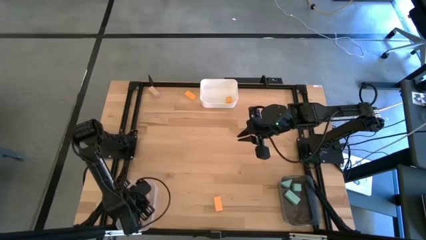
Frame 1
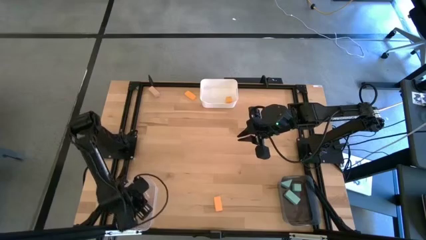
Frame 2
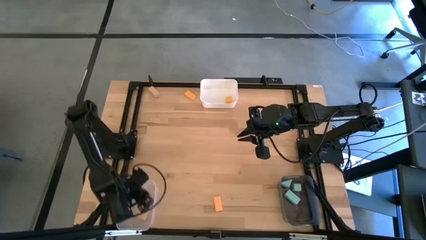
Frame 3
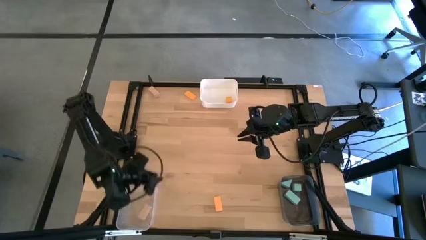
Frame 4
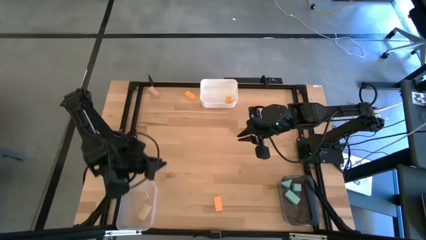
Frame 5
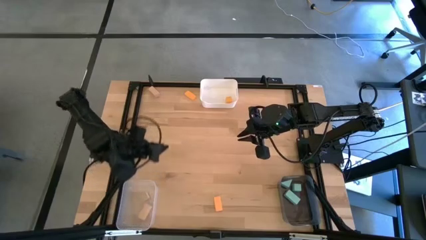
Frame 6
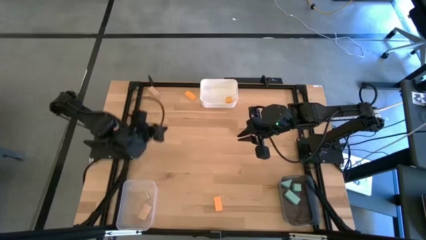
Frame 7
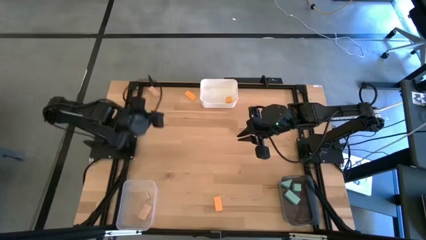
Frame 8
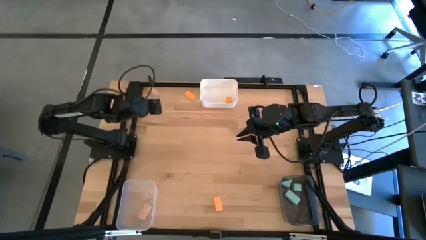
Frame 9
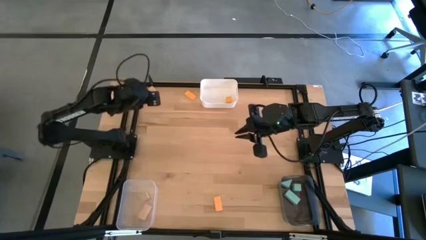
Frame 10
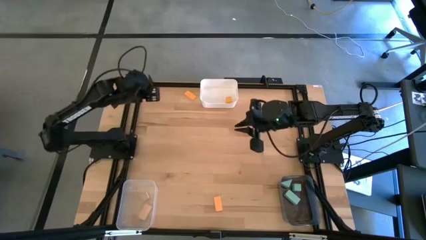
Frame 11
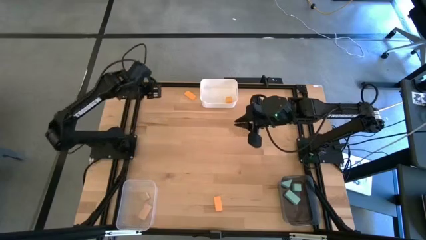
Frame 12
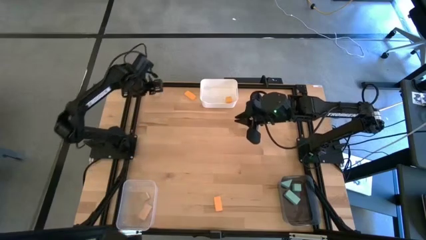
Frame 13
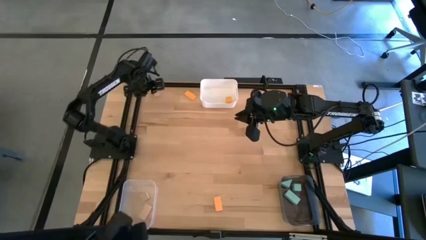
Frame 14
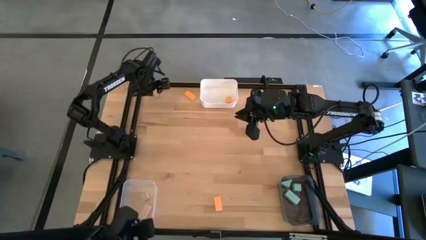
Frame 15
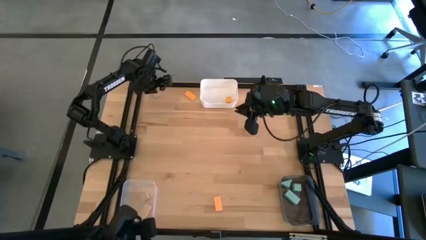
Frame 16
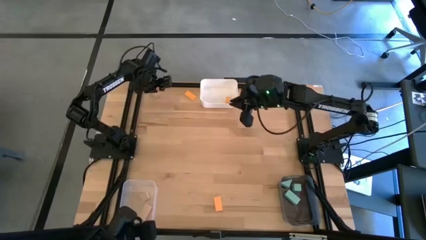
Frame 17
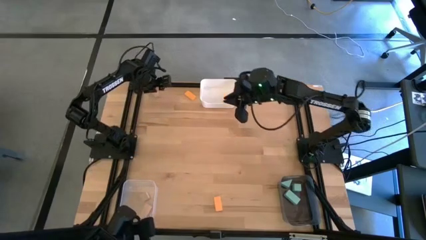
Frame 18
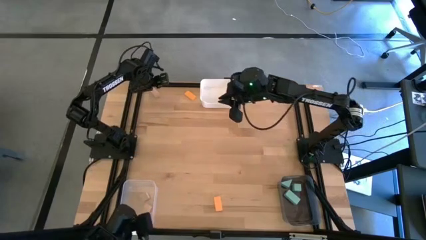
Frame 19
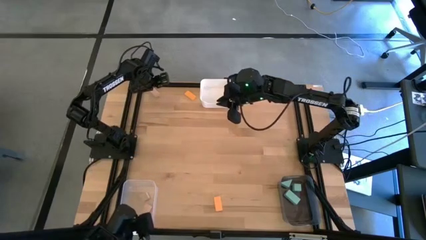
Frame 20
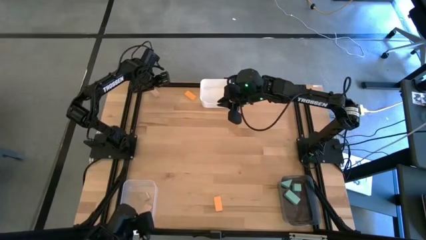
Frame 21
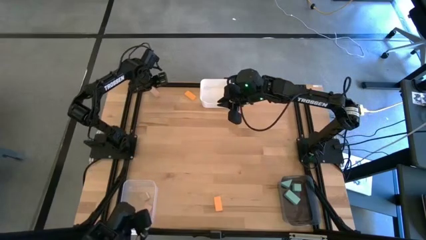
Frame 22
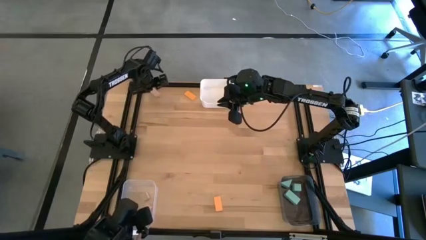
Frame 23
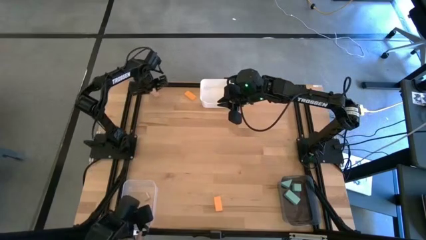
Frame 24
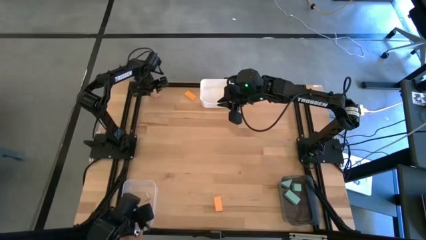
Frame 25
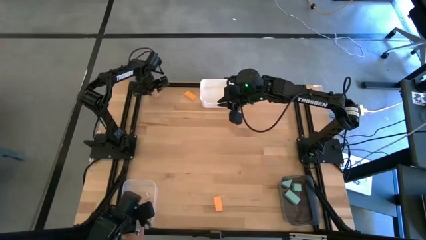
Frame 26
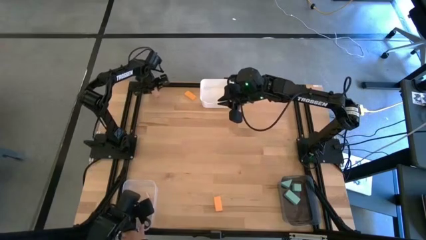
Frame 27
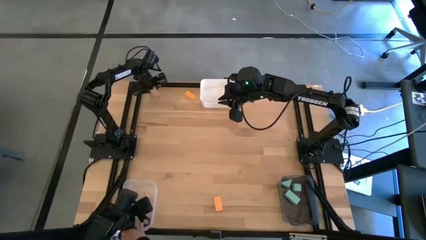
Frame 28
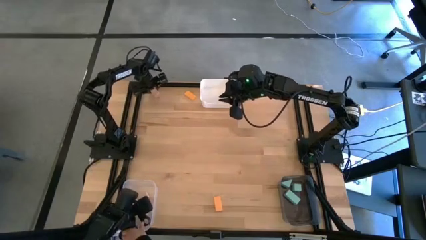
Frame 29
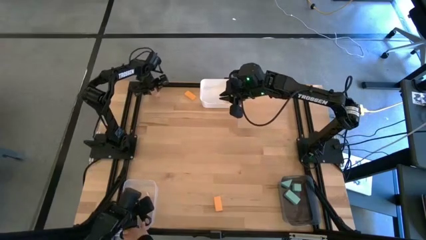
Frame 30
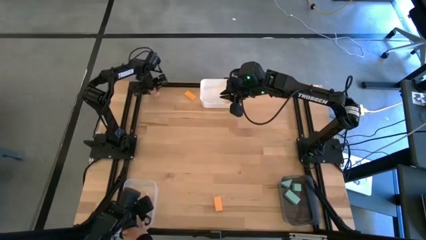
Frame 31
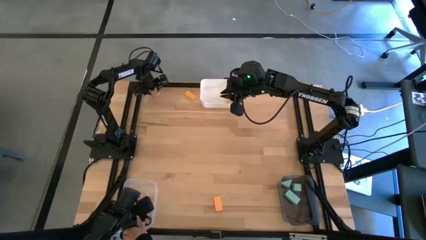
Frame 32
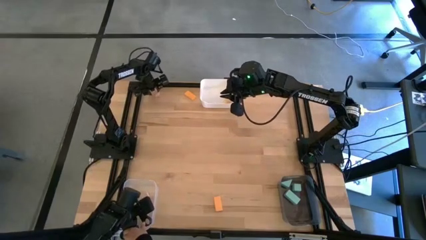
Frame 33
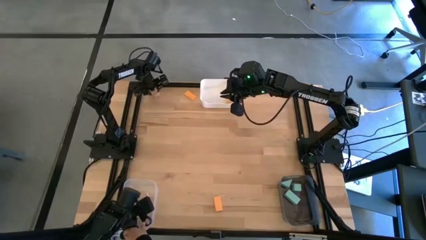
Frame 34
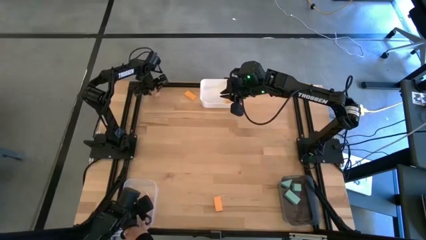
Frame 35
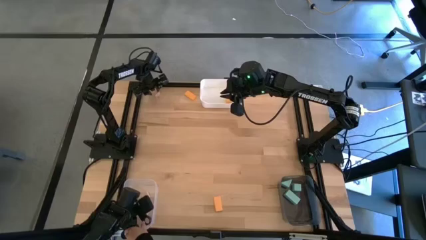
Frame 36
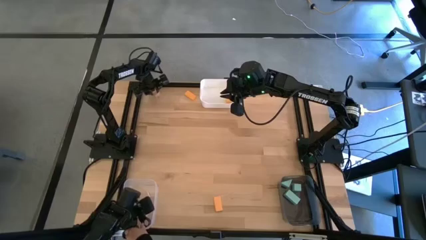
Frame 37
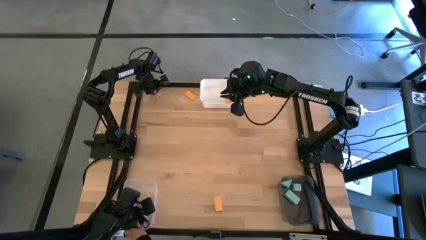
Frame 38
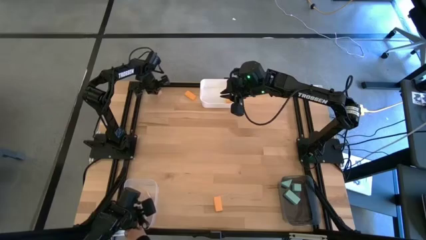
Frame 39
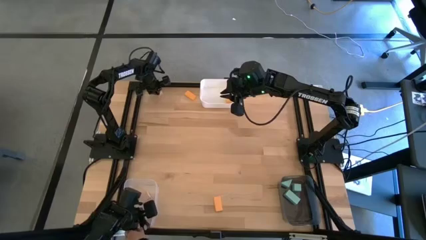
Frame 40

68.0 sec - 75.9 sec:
Task: Sort & place blocks by color
Put the white block into the transparent bin

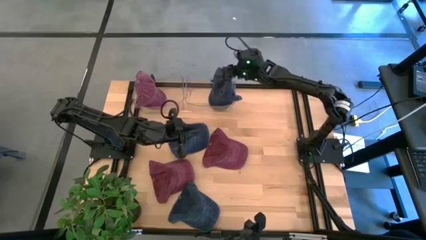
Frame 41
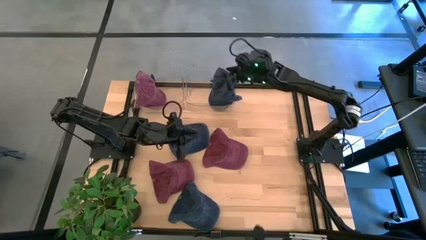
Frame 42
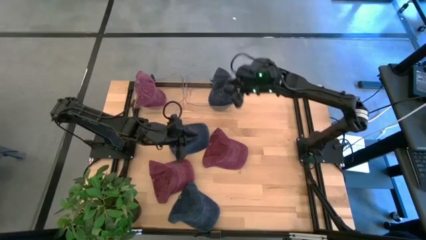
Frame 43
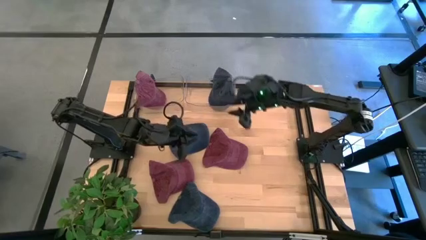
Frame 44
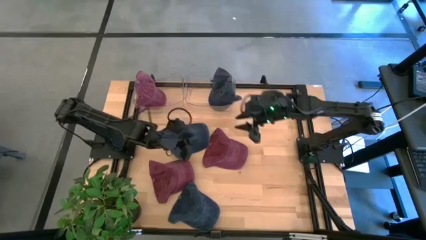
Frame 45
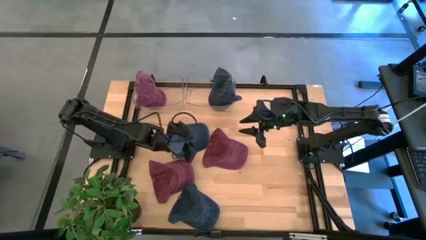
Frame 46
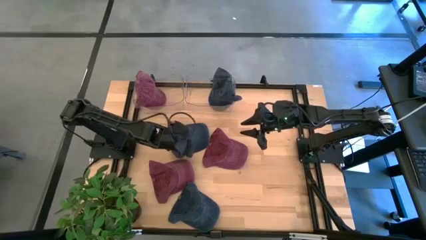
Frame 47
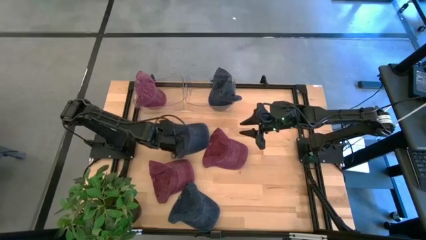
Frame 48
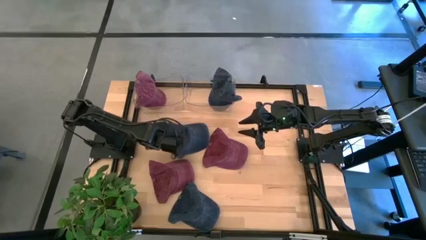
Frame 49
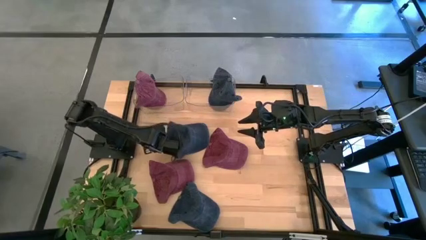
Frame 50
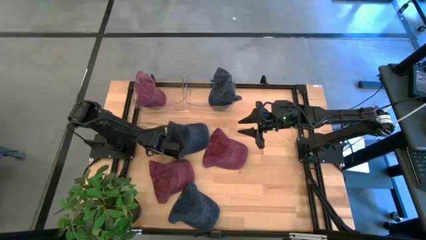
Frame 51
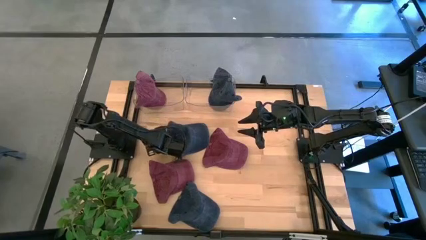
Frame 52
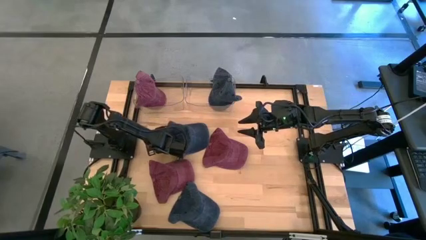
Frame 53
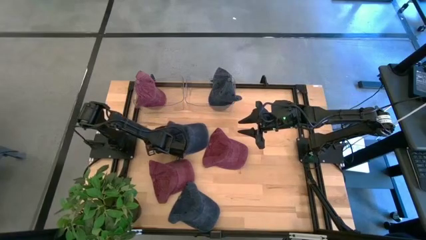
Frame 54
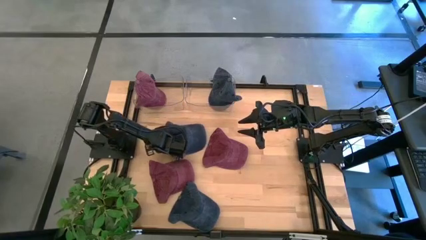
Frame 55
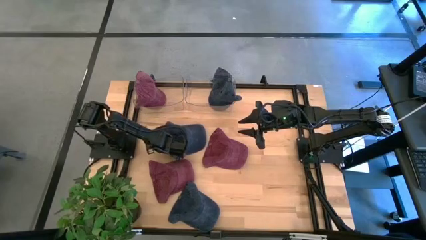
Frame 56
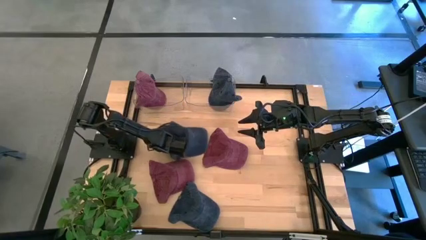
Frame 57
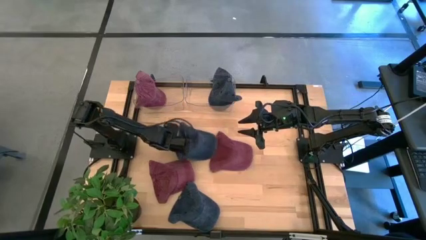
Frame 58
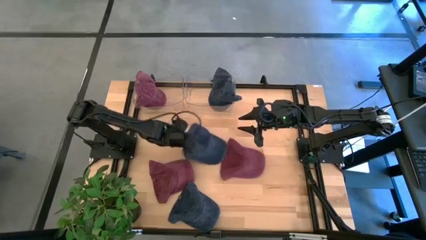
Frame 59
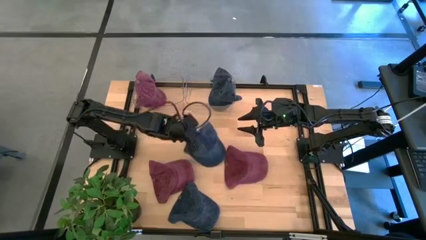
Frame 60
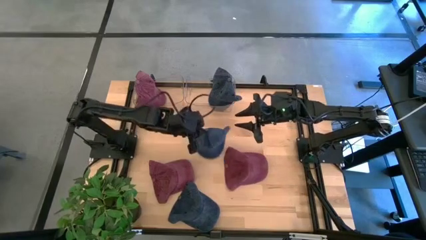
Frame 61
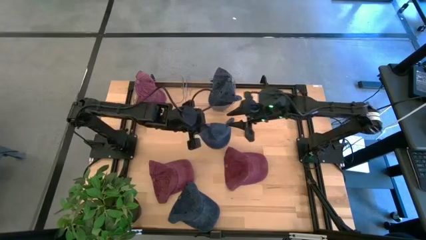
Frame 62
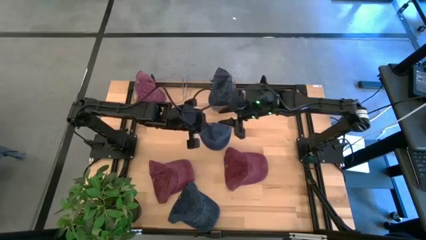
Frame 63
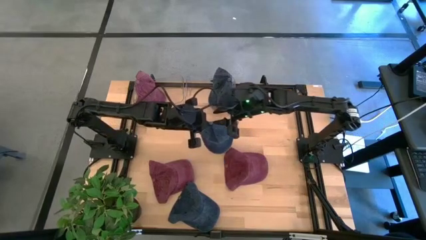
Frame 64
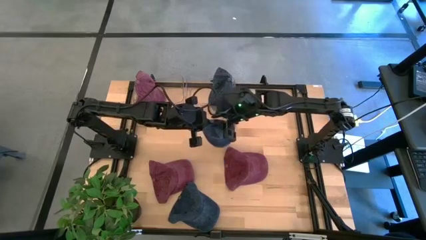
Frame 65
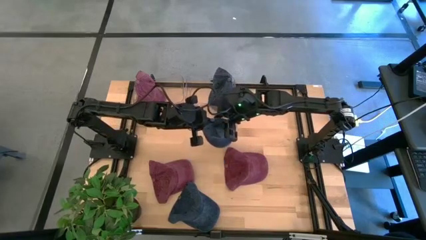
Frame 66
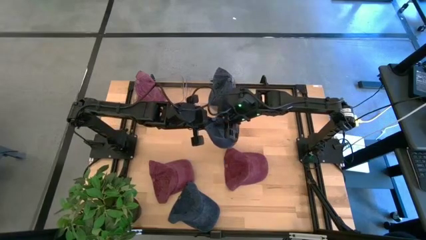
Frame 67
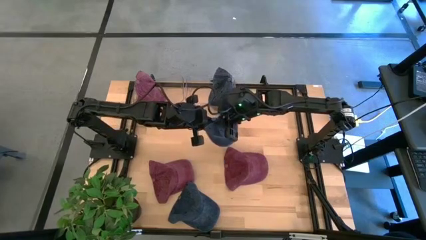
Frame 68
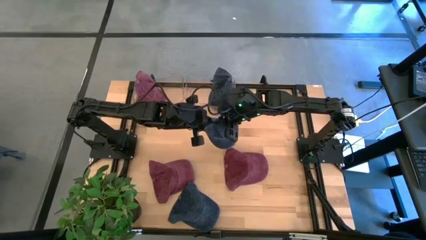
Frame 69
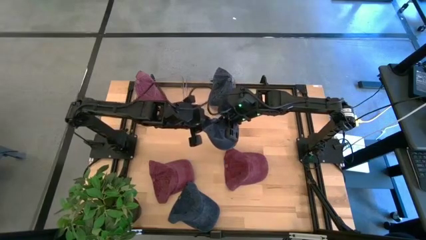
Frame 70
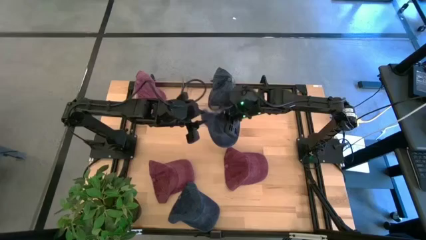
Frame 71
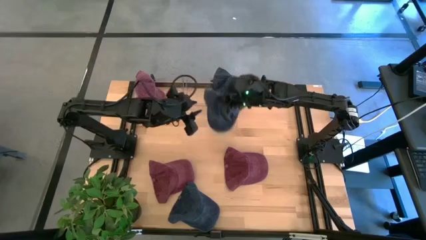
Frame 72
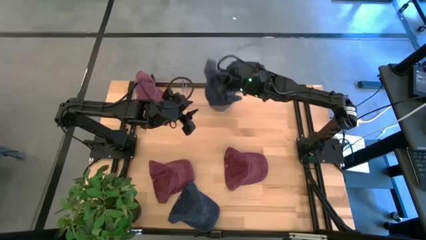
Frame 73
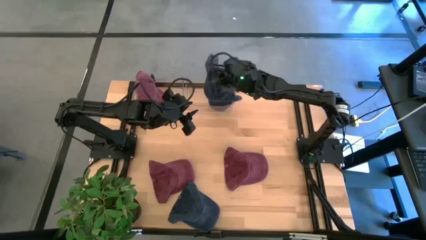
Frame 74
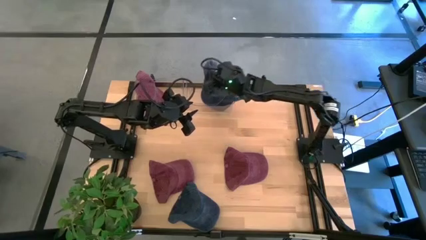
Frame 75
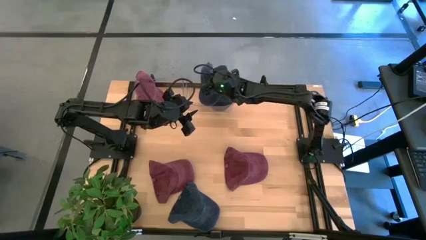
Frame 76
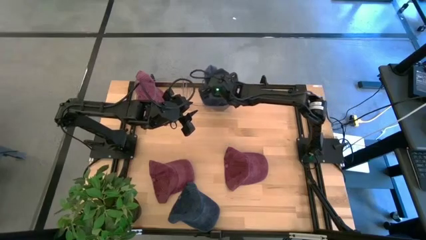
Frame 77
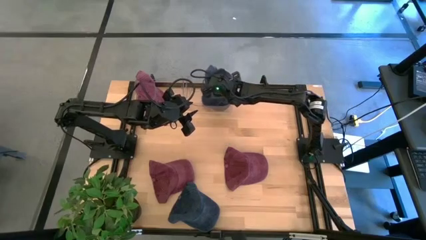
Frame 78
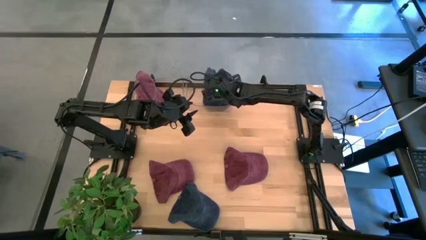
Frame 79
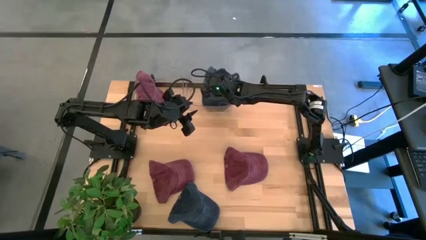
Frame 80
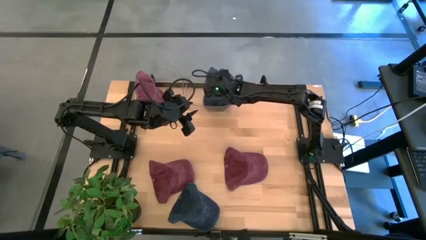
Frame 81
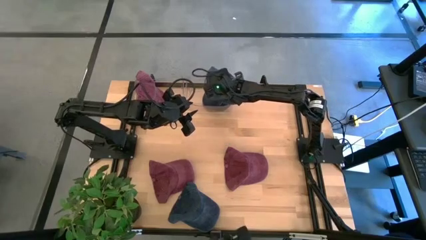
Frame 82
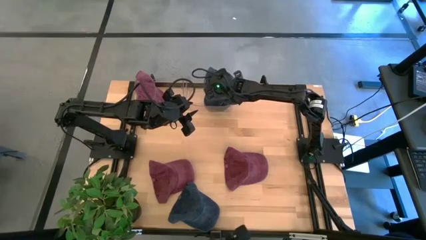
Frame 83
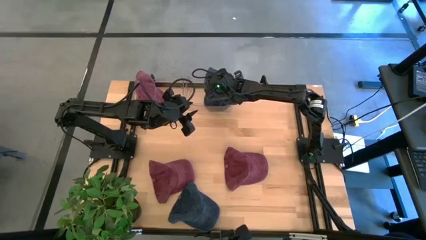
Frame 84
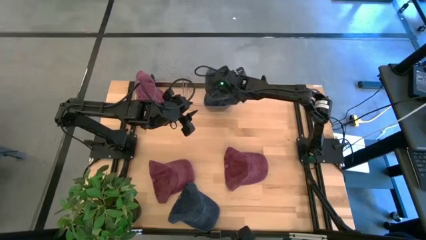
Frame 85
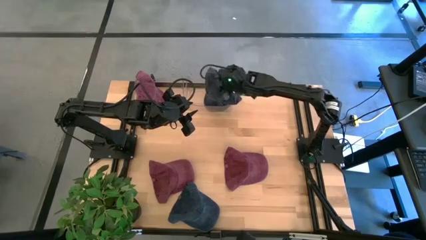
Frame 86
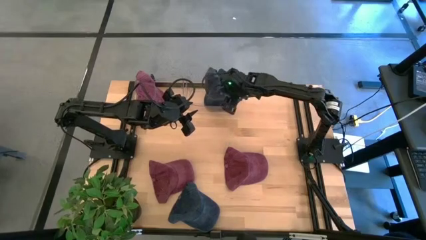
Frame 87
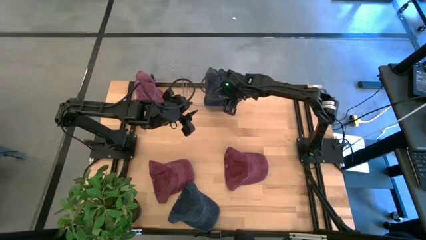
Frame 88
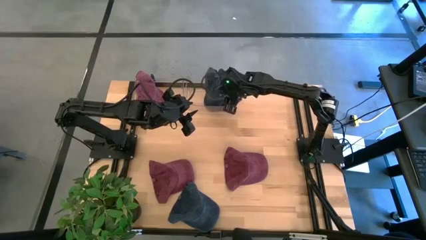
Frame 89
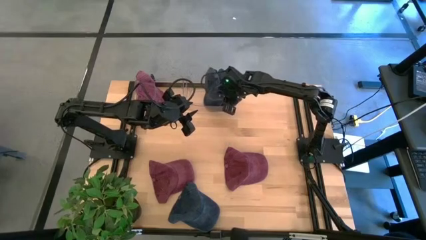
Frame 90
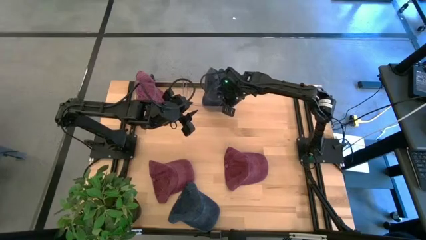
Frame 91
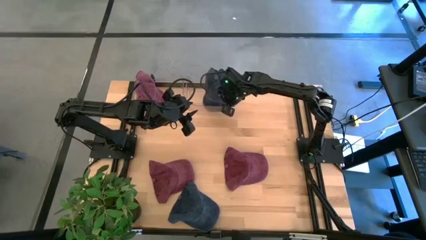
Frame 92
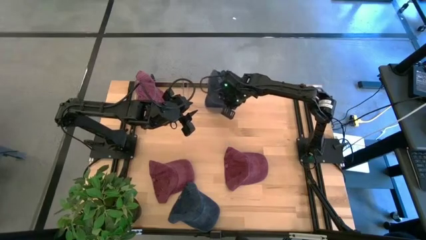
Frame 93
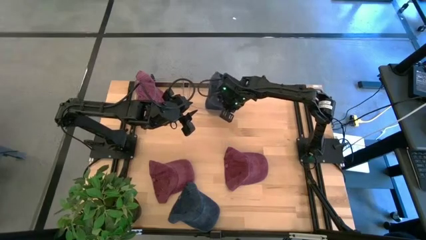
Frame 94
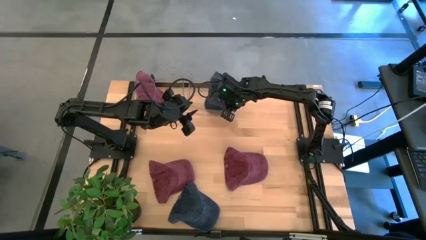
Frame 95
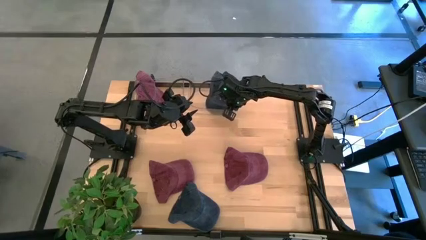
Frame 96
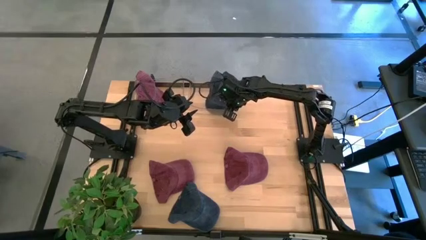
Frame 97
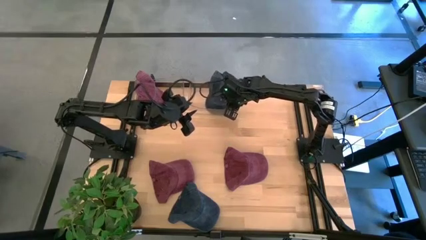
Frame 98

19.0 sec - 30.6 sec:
Task: Pick & Place hat
Put the top blue cap into the right transparent bin
